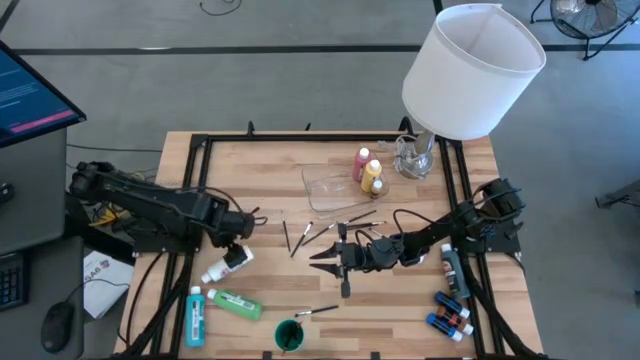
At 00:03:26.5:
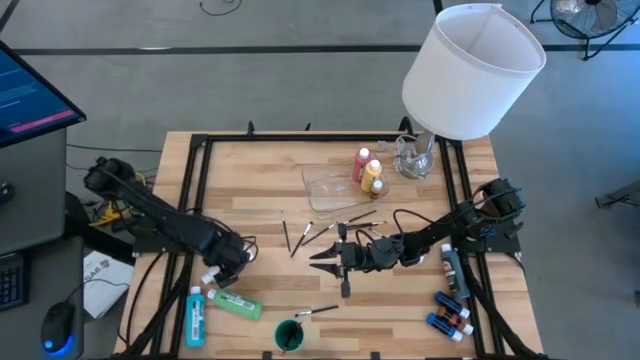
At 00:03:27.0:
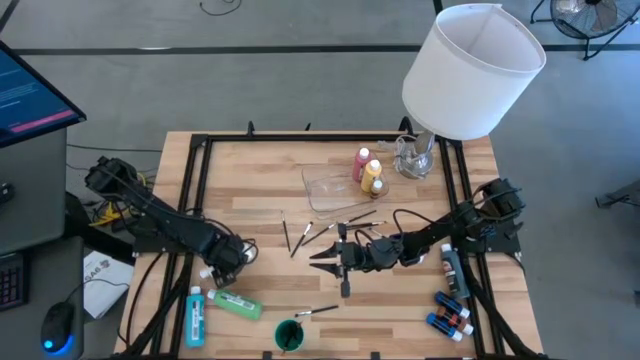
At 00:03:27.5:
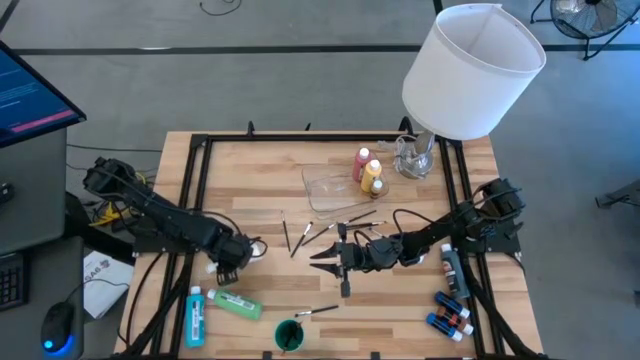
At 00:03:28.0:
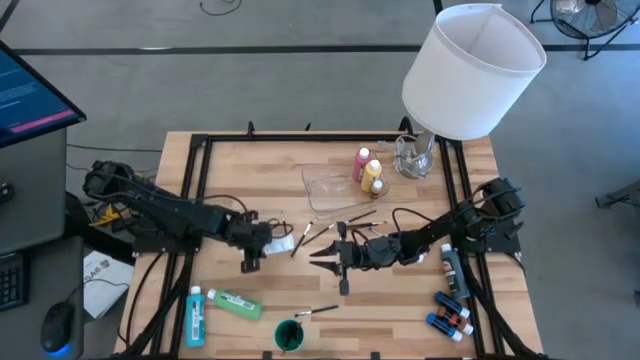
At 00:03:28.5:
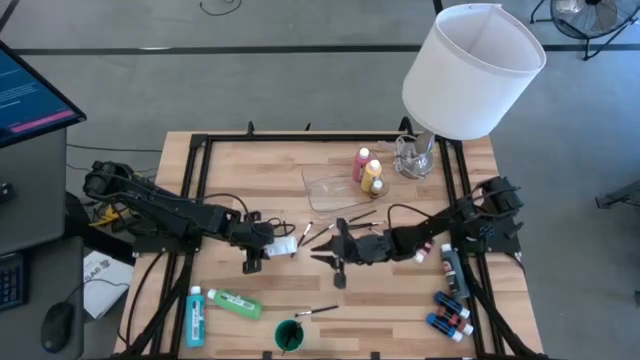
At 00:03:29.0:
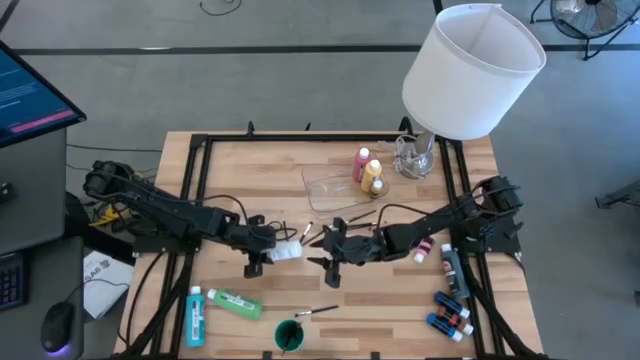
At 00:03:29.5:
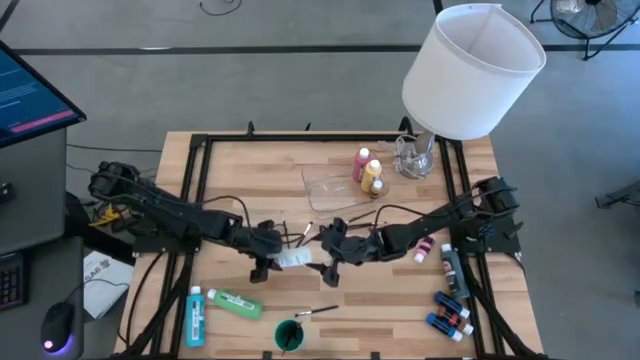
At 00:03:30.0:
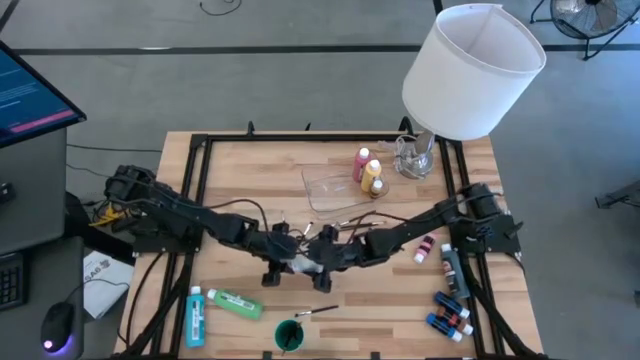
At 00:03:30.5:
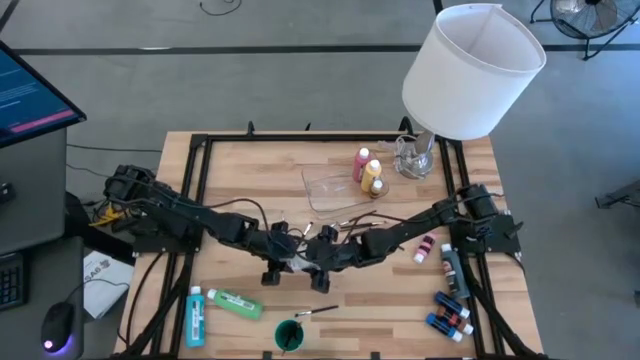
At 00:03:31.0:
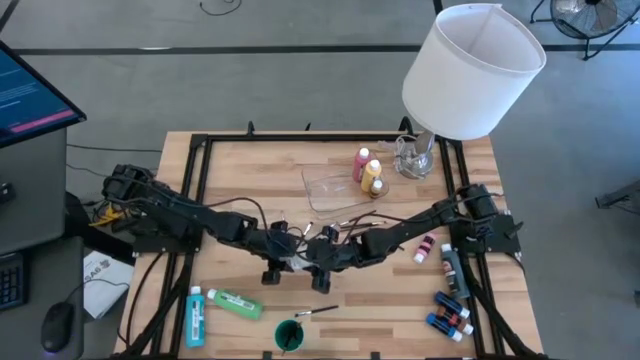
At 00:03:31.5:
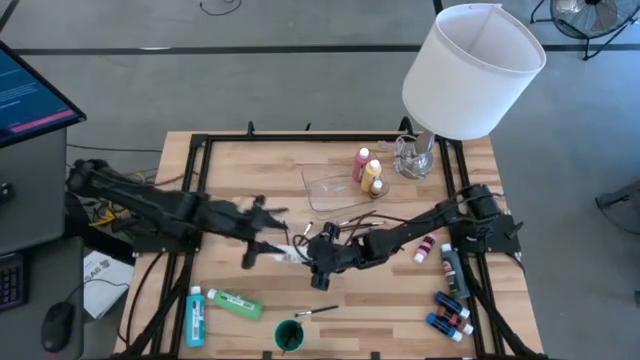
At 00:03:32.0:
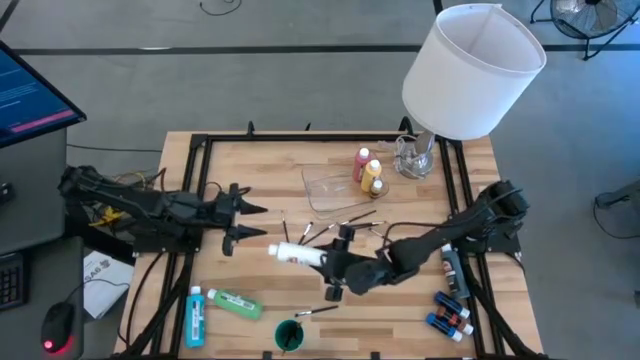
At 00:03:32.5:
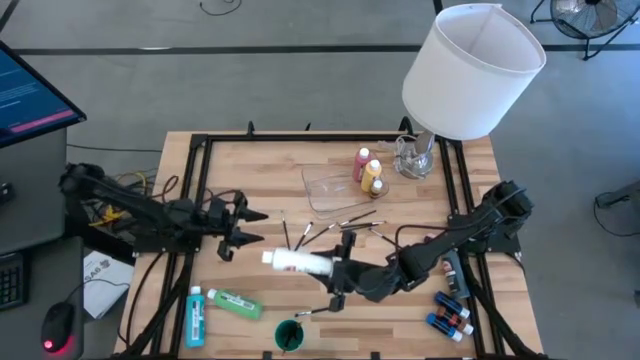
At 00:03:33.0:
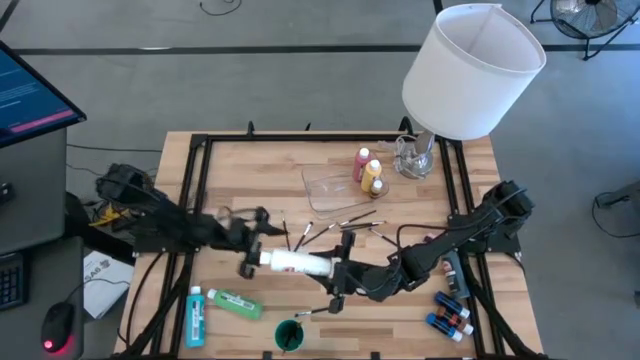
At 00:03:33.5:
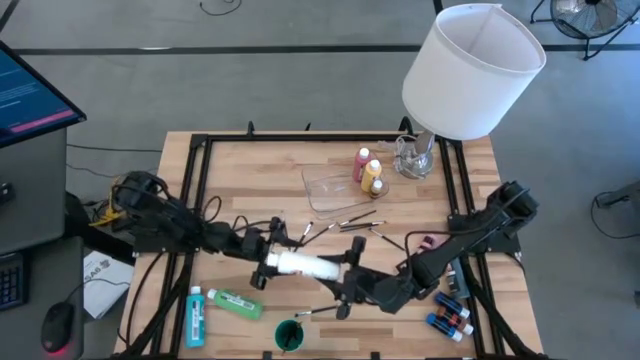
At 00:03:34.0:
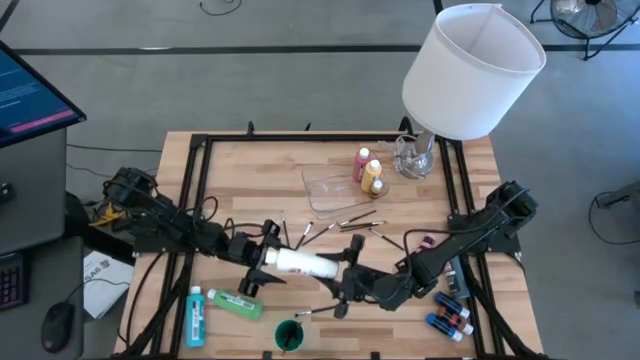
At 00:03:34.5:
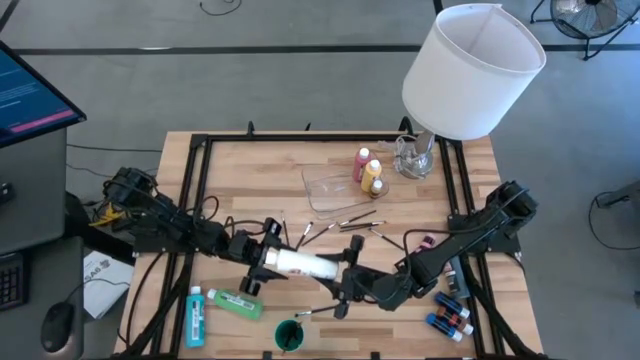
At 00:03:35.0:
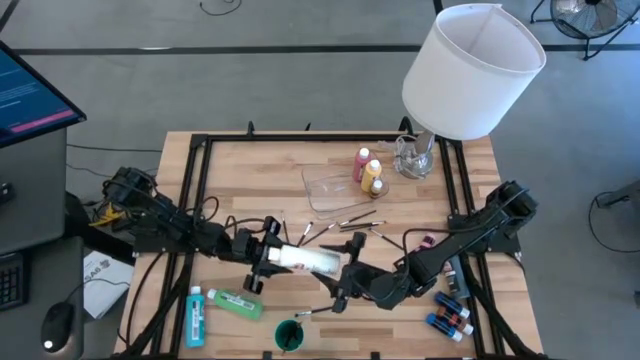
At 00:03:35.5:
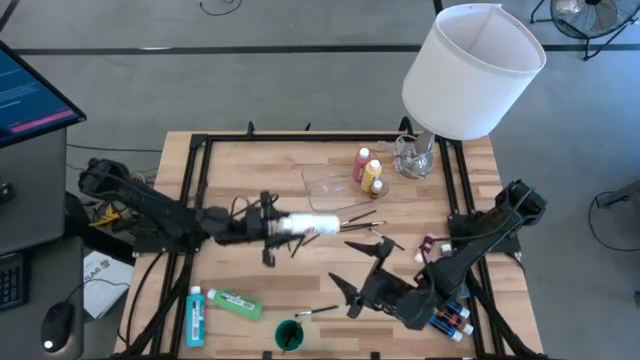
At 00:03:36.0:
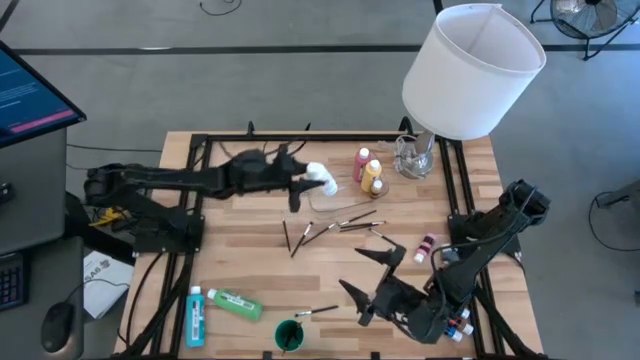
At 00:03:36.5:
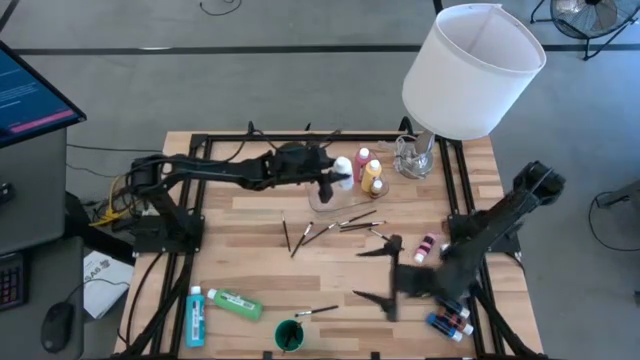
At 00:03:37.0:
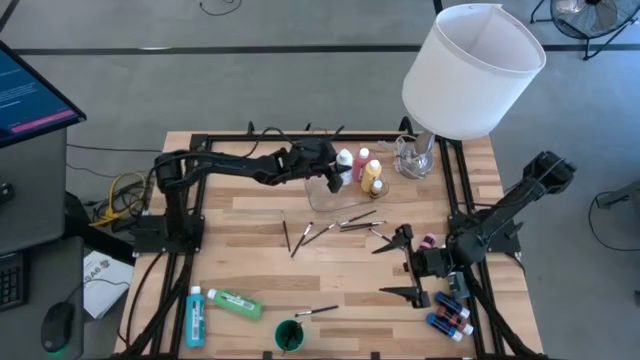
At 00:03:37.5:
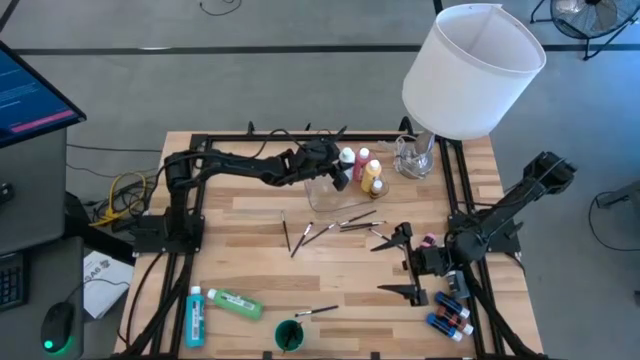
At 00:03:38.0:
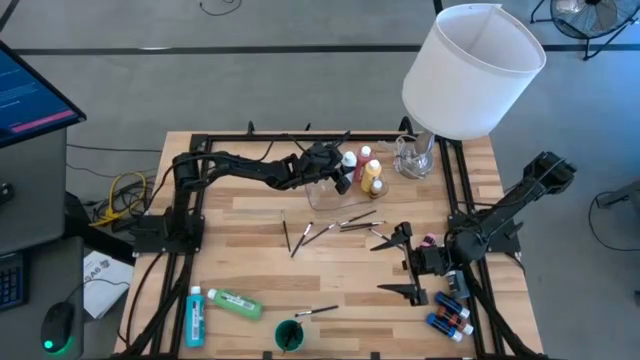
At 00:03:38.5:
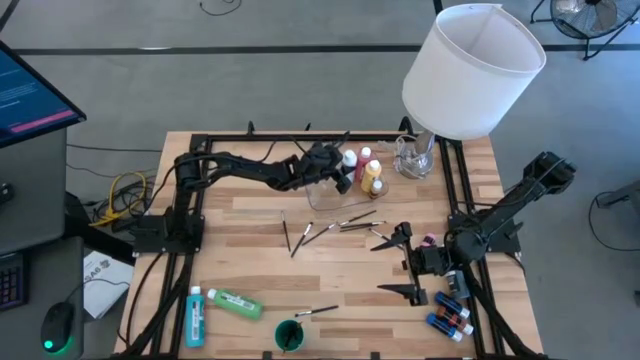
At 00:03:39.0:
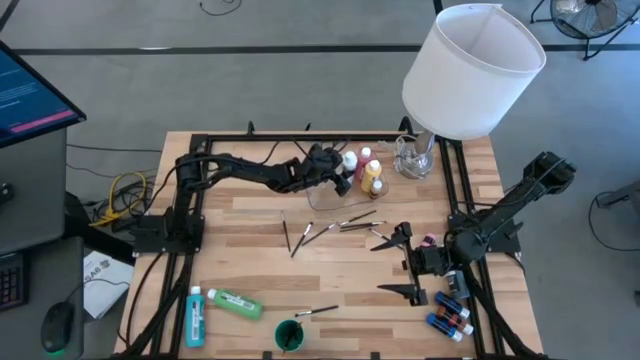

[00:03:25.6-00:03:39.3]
Task: Pick & Place Paint Supplies
Put the big white paint bottle into the transparent bin
